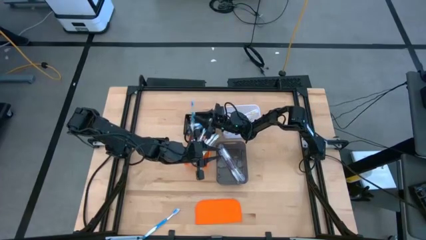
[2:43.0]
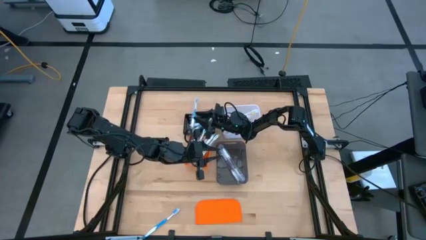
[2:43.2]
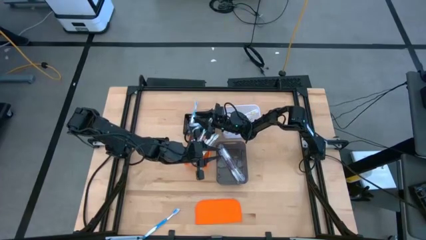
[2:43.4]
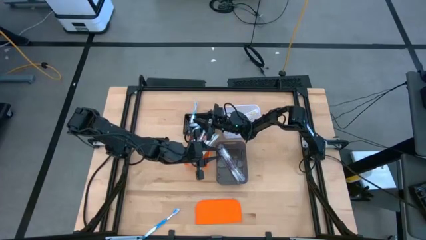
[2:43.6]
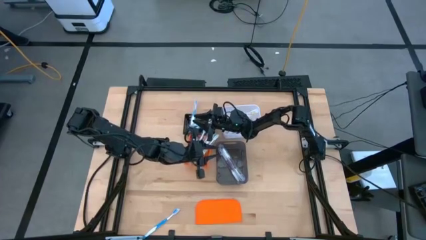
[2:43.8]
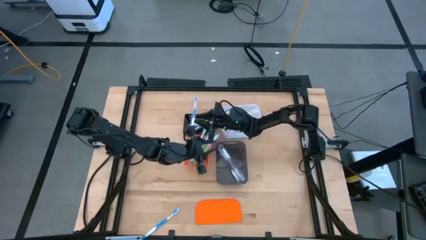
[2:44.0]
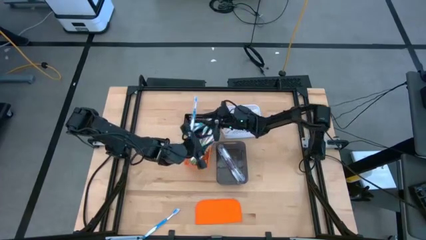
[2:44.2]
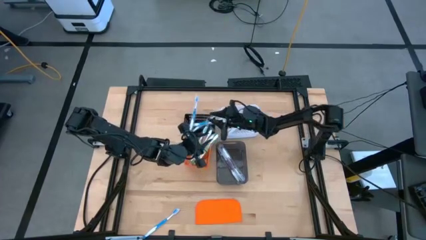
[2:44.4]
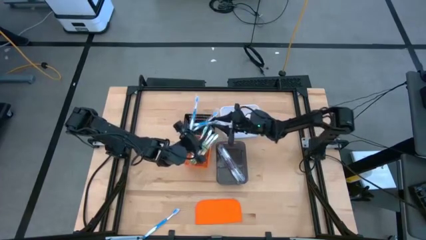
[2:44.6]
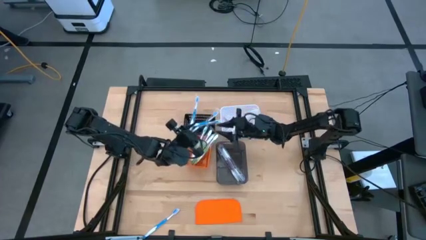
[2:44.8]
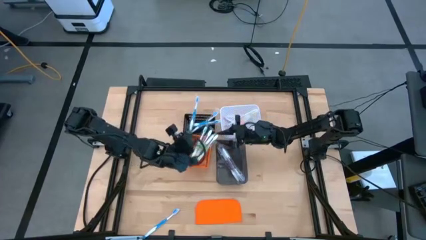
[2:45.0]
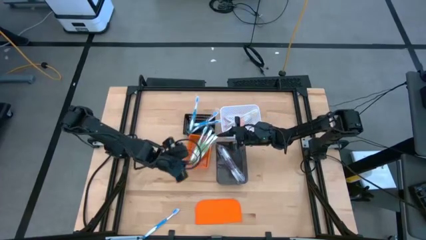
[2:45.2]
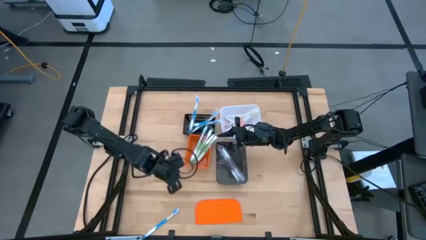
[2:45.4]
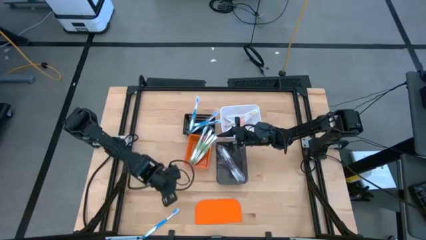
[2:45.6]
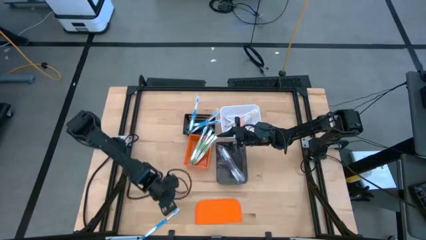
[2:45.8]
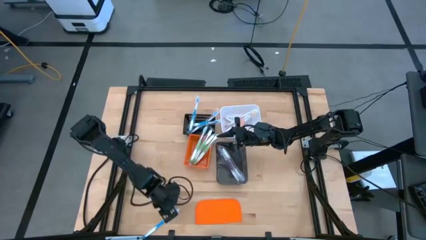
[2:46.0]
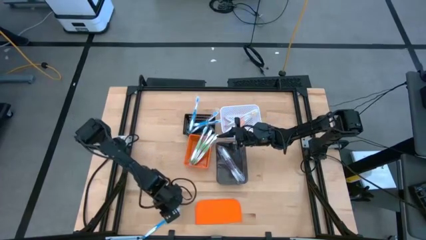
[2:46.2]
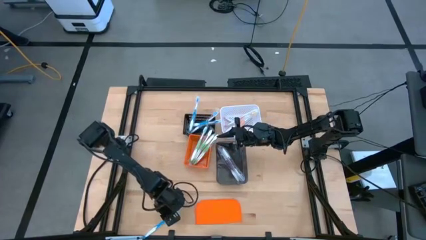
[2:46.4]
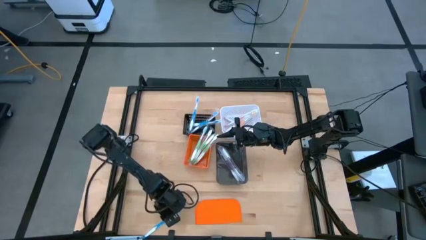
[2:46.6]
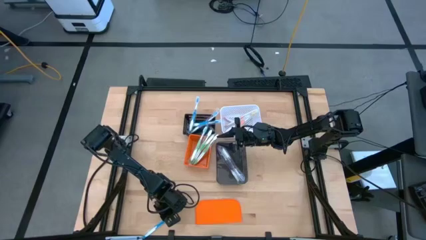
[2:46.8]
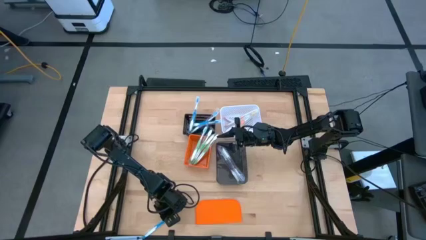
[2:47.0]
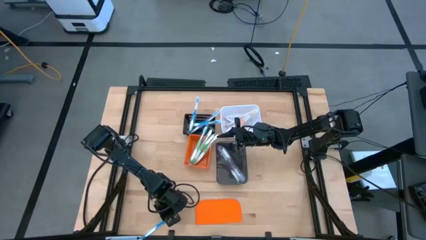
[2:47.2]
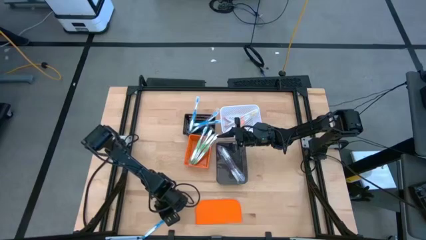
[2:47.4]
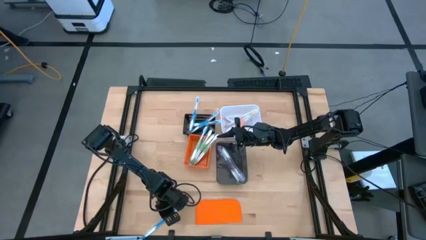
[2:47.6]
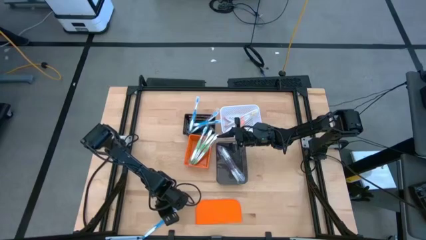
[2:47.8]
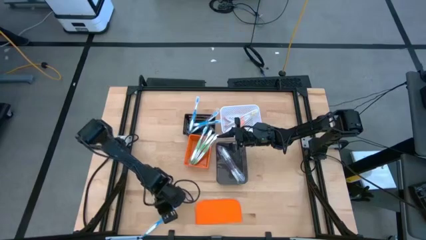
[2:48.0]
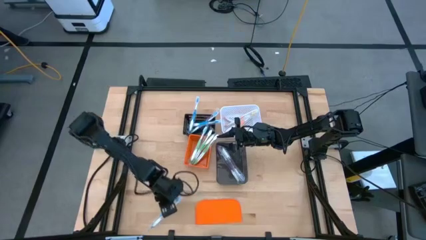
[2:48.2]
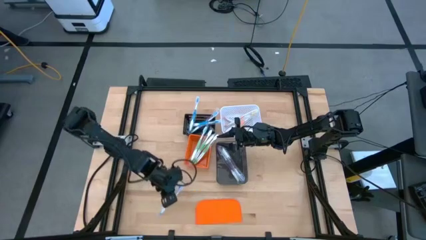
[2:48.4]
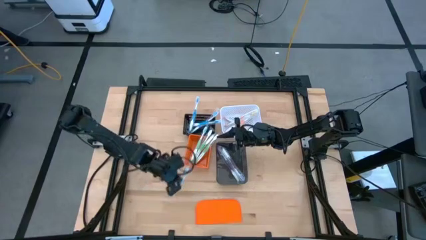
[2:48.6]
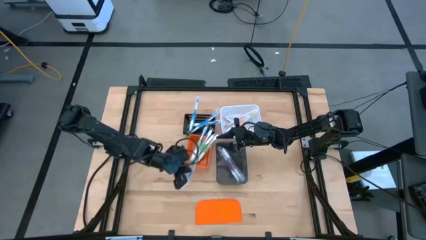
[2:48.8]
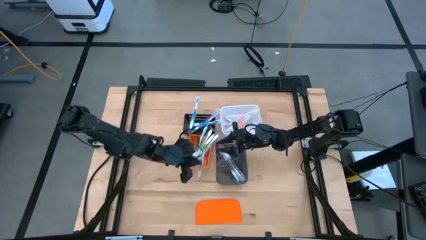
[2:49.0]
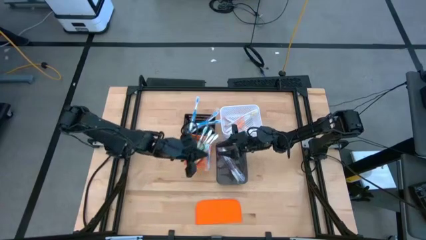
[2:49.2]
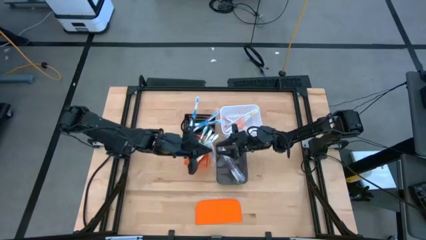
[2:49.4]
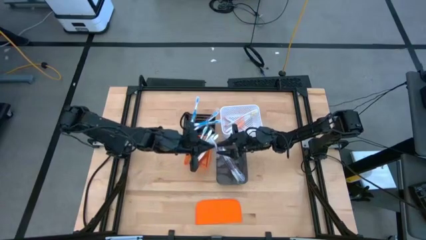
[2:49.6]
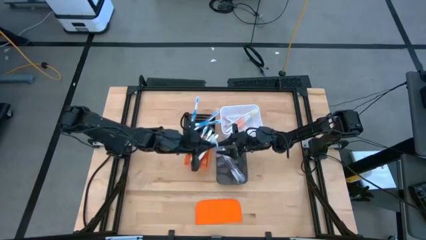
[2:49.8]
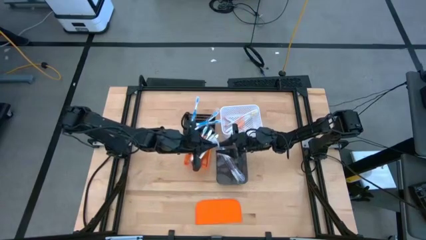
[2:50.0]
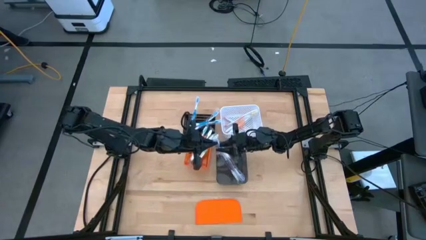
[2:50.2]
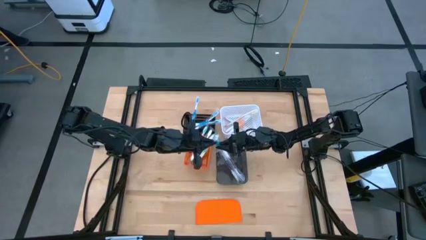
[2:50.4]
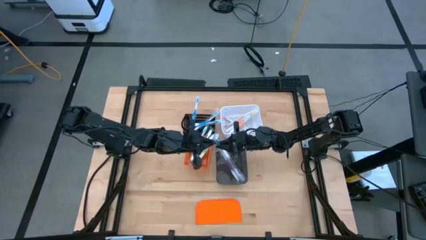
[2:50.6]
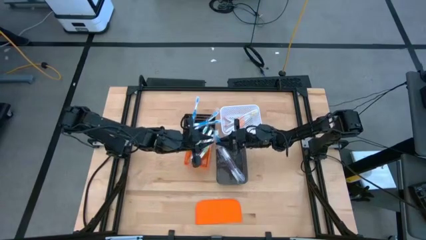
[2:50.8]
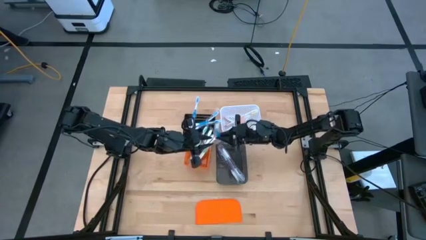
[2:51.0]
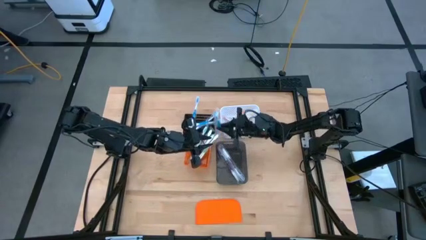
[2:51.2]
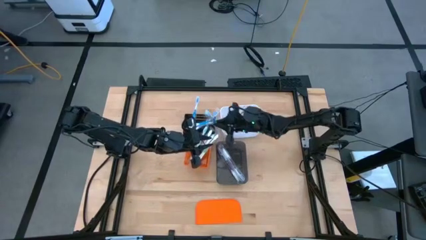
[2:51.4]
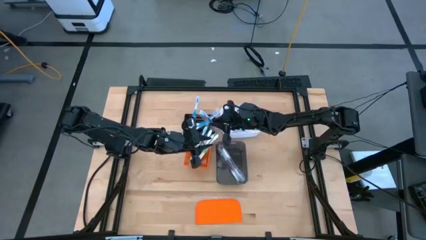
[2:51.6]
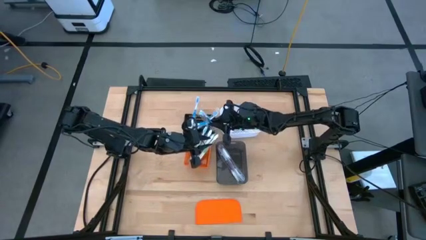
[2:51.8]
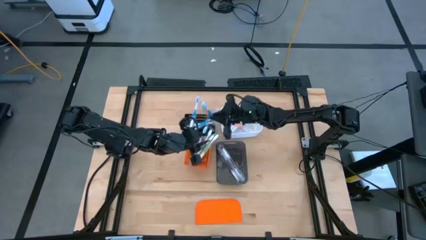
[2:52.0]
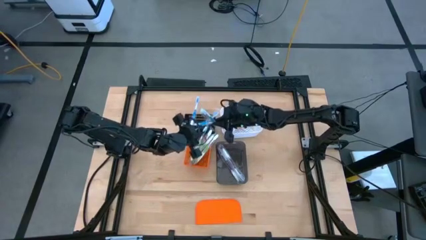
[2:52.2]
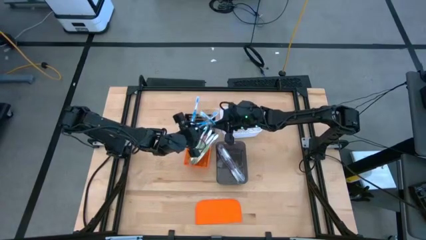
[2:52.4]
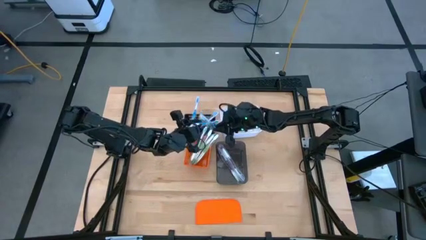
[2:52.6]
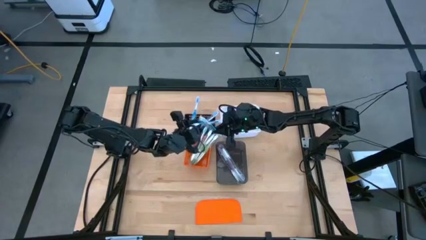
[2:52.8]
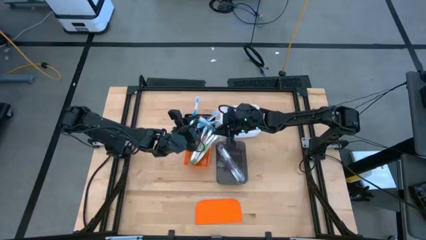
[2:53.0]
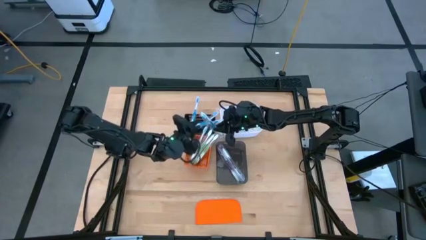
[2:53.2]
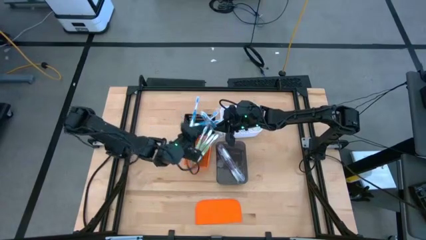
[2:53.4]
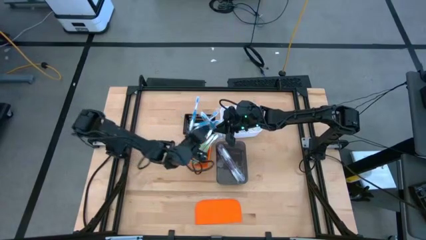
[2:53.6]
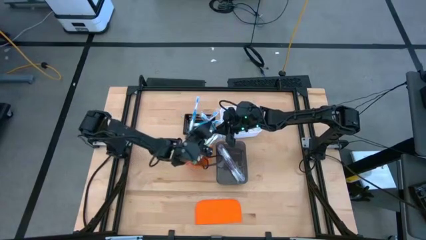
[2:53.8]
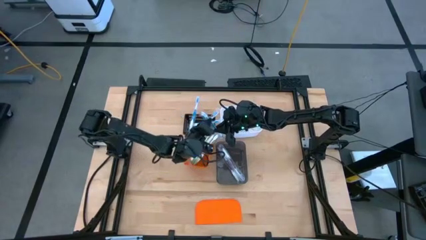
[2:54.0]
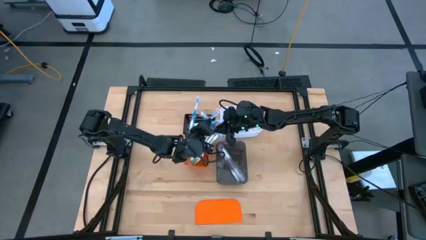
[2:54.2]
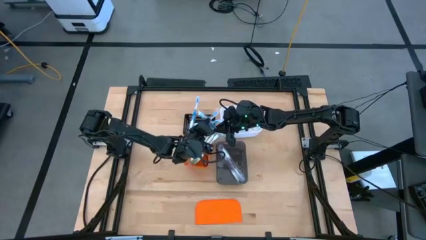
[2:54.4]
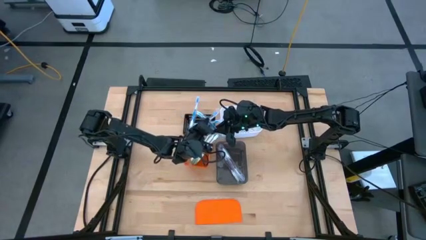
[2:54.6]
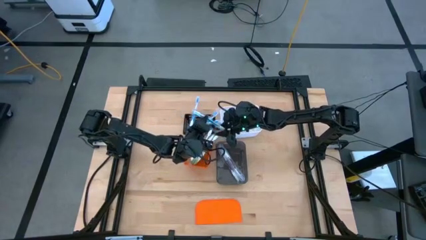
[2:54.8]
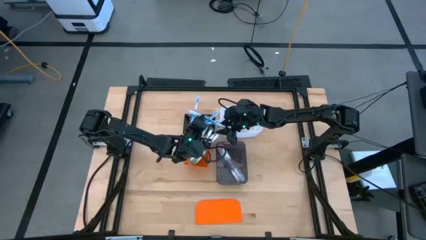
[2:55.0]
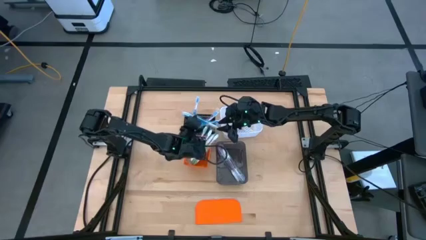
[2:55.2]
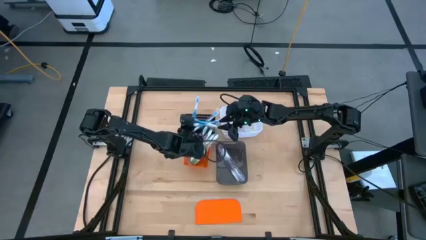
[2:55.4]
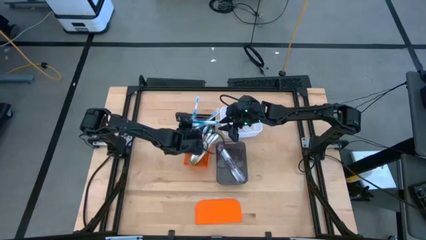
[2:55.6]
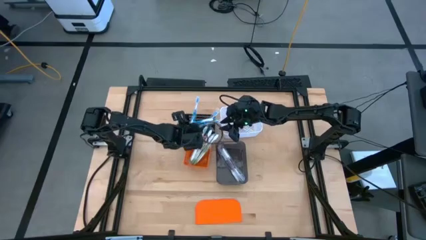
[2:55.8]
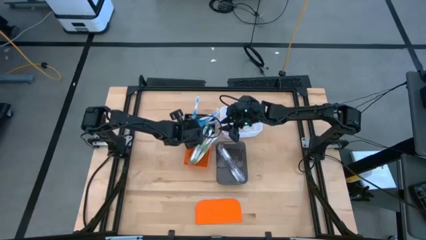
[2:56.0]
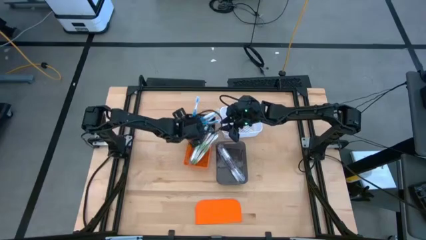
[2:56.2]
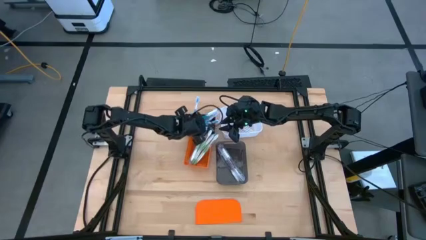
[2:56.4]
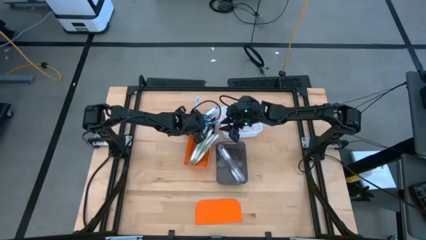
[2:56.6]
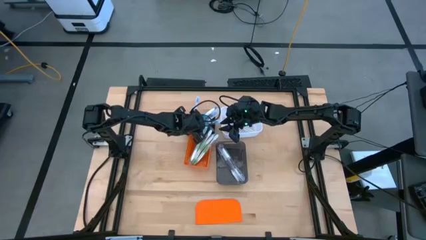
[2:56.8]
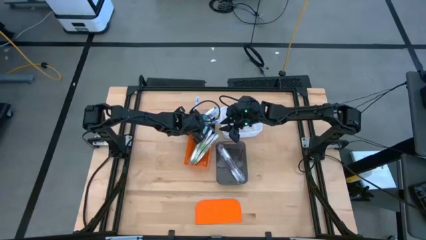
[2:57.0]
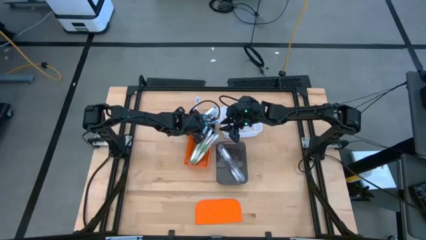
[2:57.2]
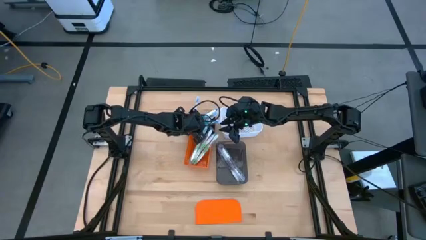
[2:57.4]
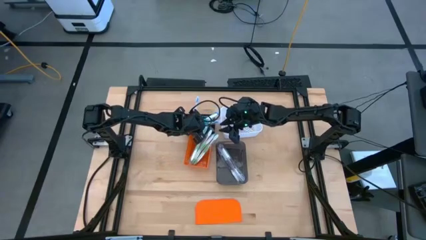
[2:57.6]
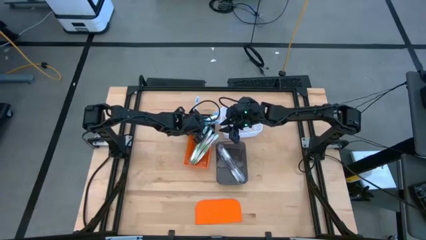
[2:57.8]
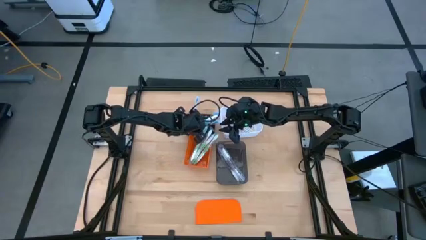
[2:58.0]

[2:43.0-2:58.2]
Task: Pick & Place Toothbrushes
Put the blue toothbrush into the black bin

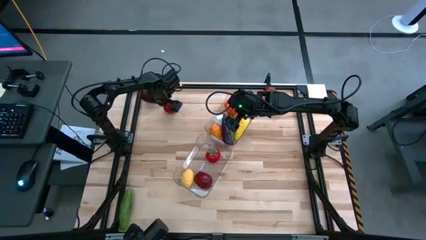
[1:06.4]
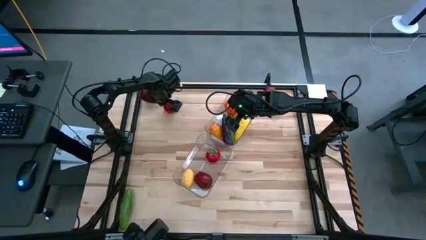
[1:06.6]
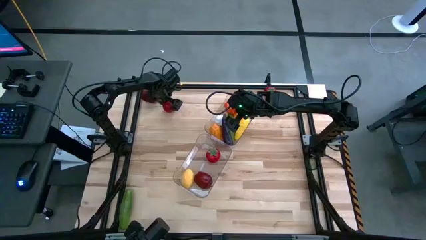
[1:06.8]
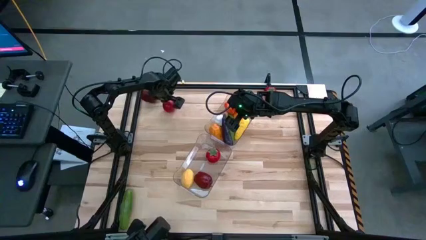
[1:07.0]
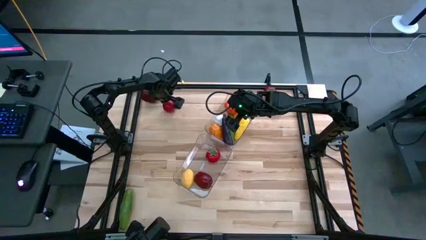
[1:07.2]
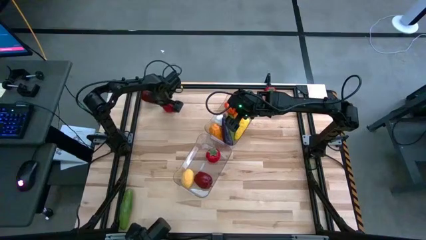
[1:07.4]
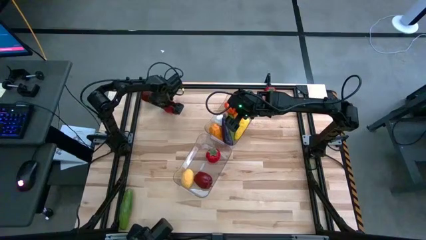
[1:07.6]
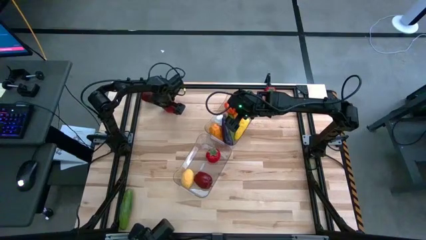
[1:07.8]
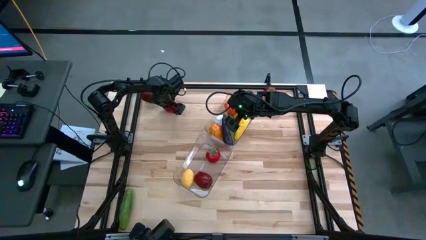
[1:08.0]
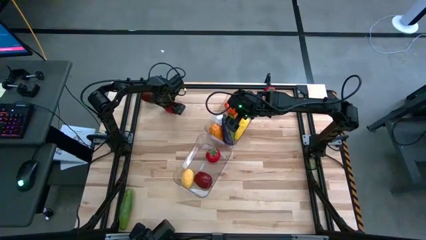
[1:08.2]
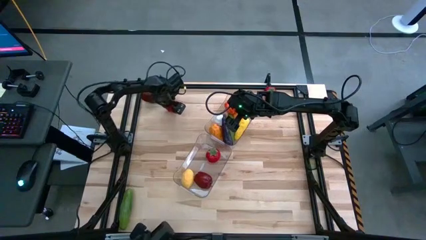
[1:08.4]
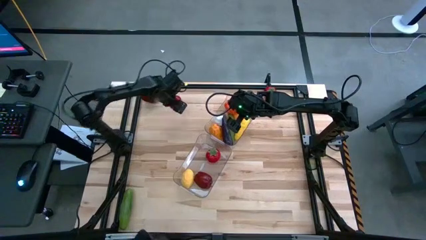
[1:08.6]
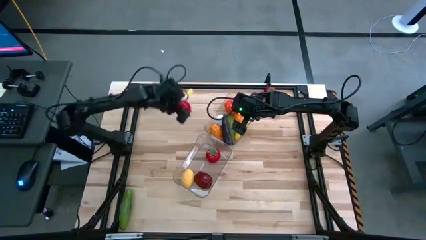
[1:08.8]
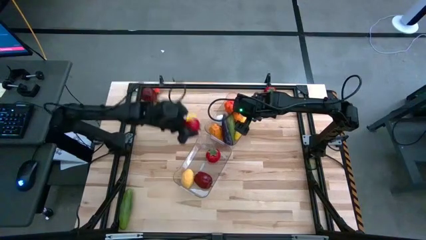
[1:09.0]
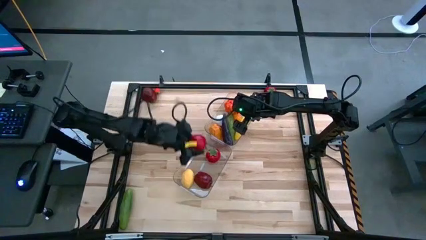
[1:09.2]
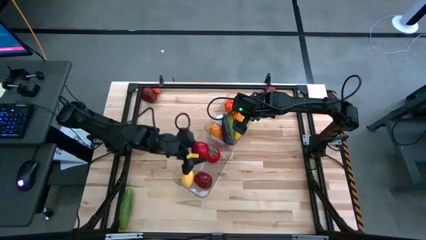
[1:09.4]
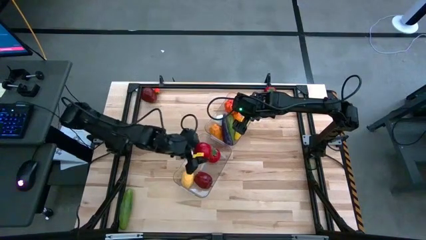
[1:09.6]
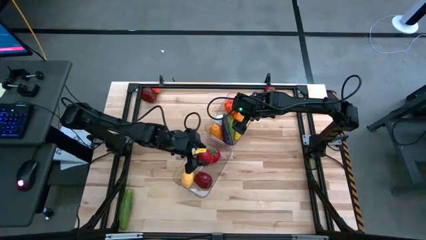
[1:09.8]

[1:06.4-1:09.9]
Task: Sort produce into baskets
Put the left red tomato into the bottom transparent bin
